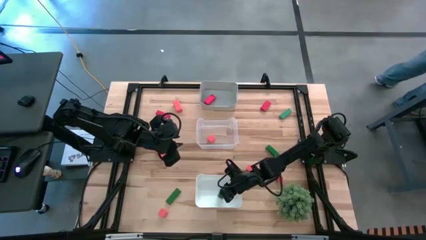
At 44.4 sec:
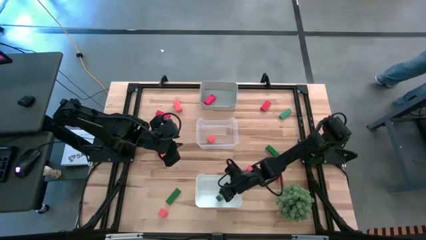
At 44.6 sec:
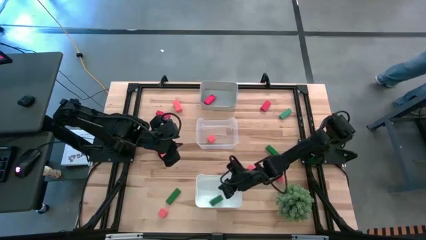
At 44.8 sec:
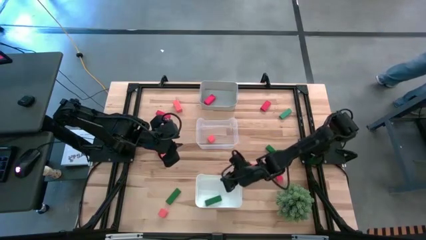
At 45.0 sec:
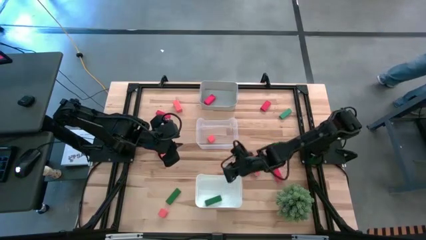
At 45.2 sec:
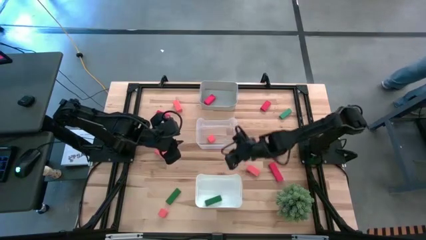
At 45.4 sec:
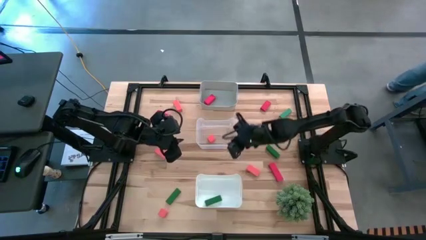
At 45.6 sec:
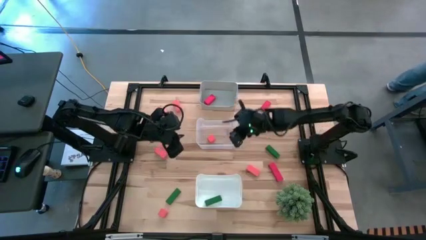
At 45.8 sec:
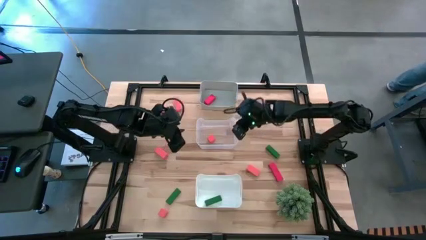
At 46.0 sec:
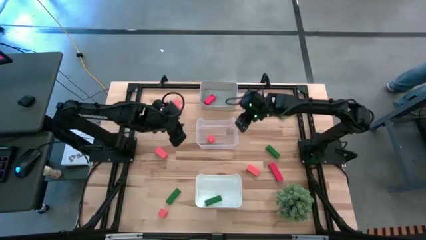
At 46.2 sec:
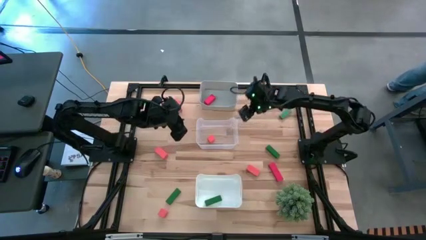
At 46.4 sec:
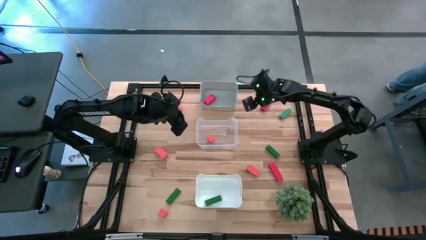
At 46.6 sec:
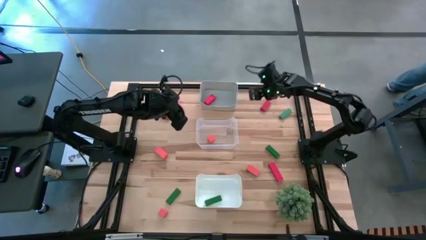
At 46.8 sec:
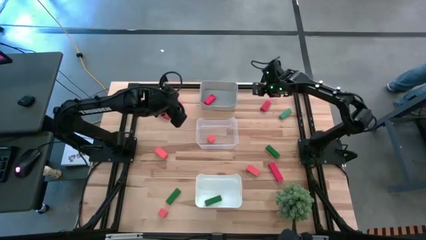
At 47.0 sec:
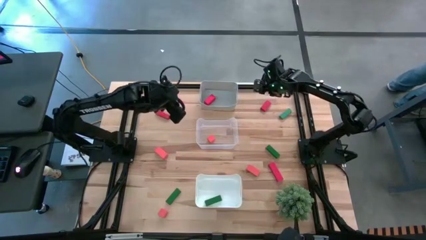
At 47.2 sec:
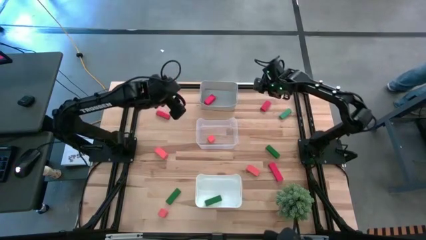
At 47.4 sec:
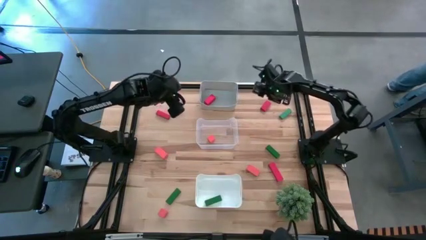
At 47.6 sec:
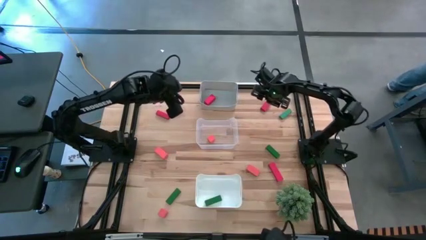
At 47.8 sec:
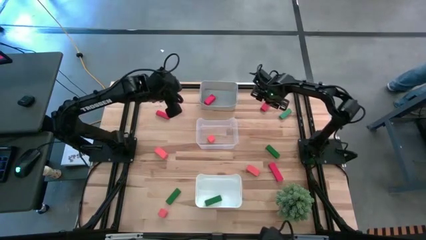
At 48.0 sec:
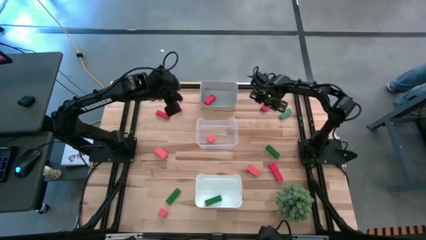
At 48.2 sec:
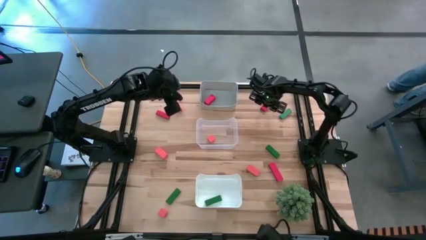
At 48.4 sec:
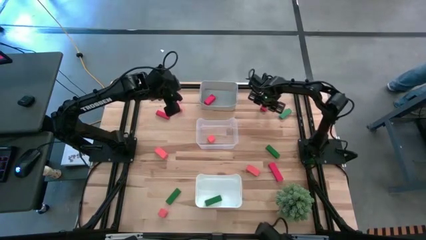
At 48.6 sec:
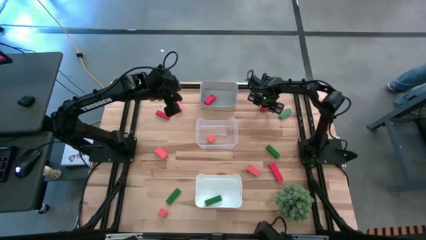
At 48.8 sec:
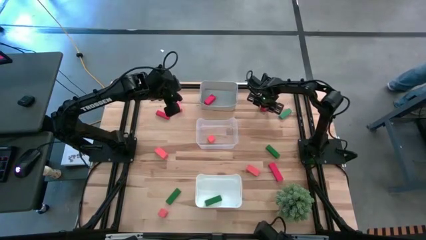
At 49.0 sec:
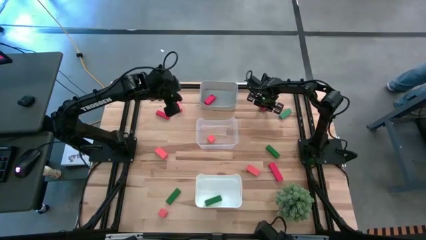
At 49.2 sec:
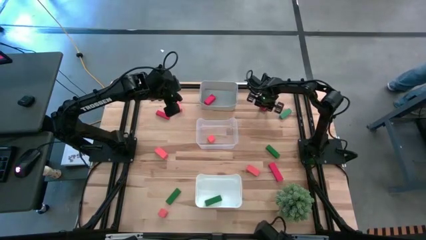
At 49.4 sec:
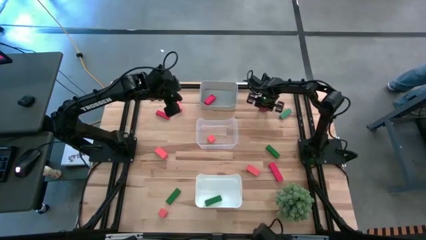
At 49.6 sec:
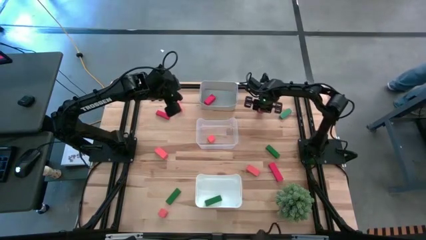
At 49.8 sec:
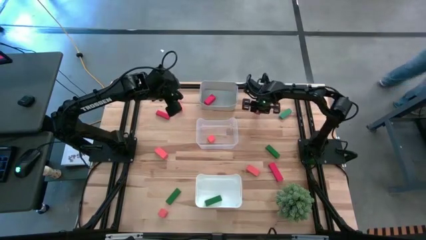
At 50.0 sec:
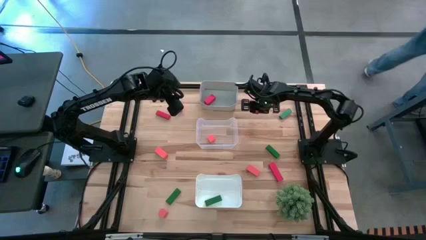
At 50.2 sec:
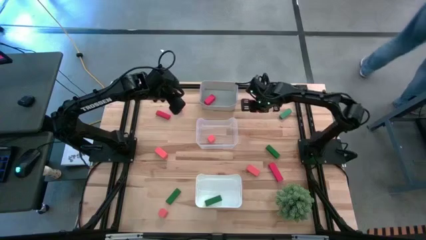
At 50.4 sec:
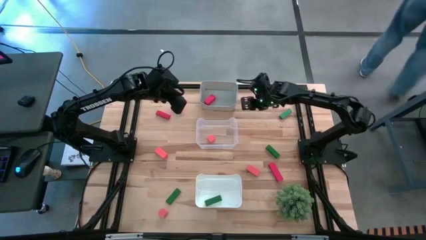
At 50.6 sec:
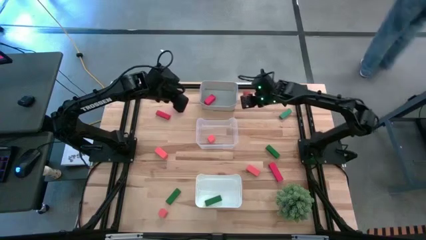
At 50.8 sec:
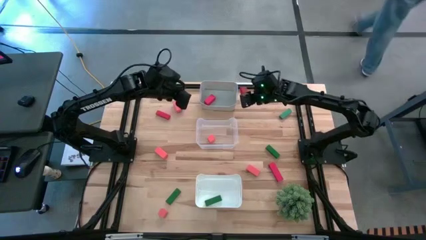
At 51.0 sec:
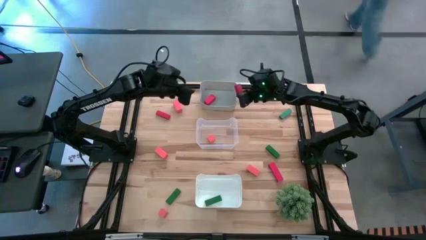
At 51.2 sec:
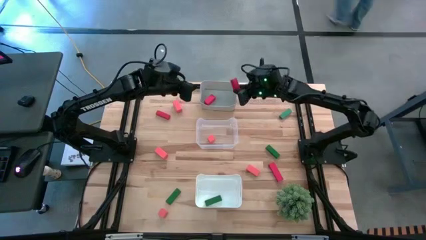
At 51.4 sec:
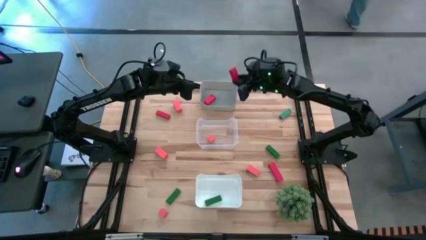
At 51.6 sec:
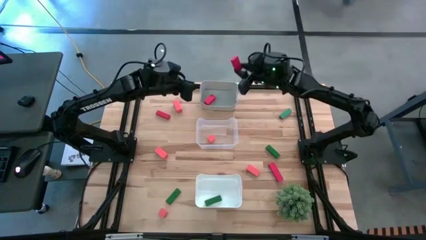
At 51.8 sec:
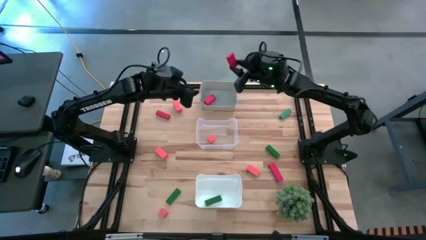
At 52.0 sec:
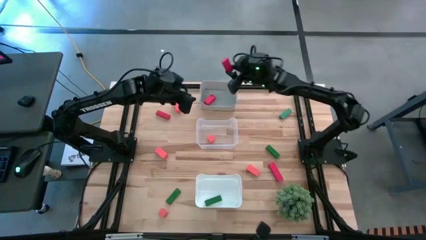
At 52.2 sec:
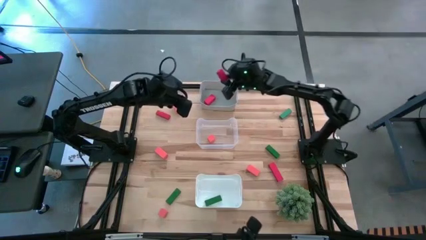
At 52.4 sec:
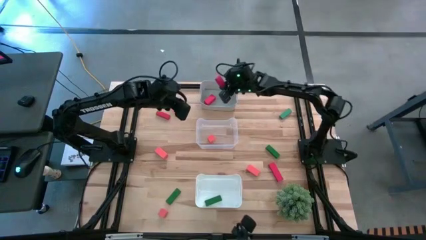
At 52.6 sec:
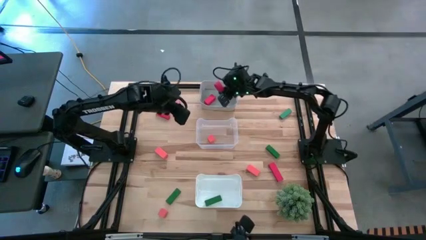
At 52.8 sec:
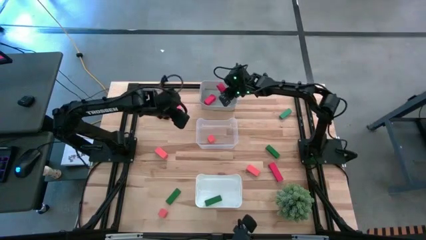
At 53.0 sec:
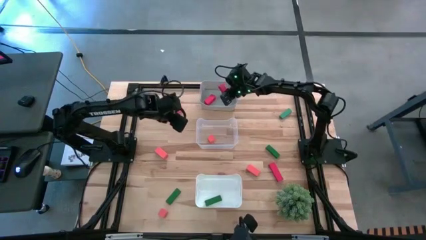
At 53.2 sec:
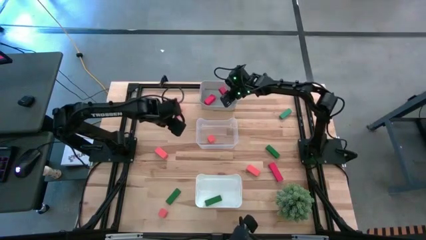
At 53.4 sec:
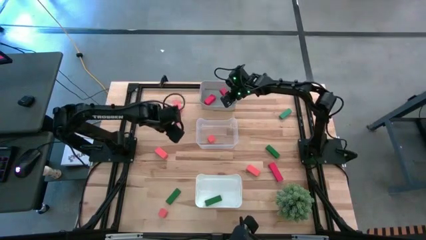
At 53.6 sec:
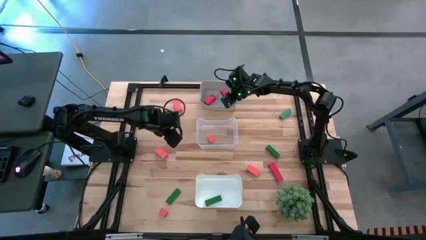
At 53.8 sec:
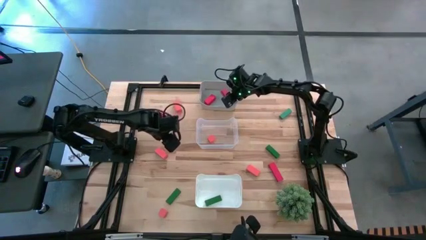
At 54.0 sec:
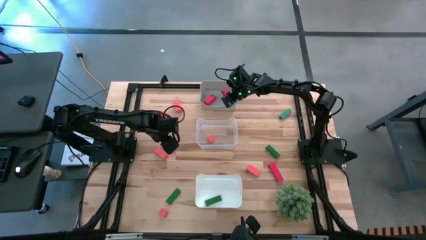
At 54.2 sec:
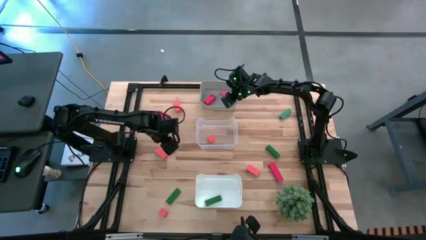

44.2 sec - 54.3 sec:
Task: Sort & place blocks by color
Put the top right red block into the gray bin

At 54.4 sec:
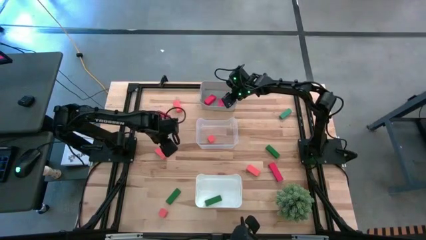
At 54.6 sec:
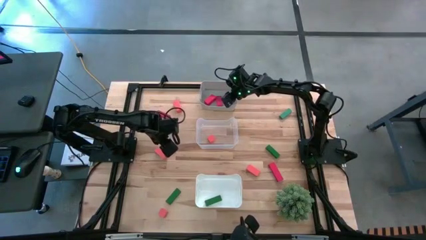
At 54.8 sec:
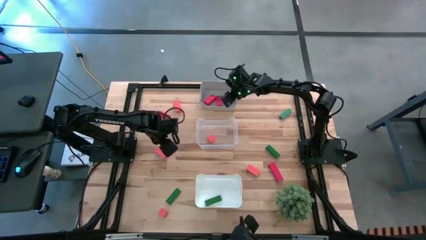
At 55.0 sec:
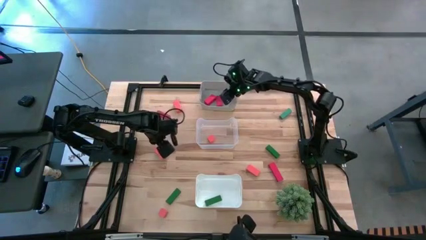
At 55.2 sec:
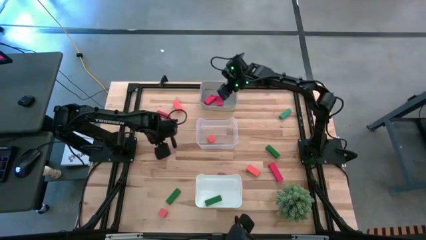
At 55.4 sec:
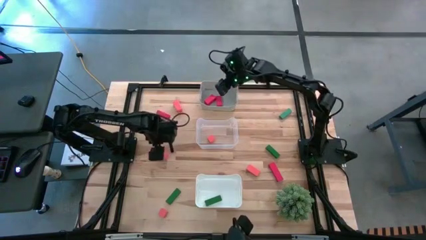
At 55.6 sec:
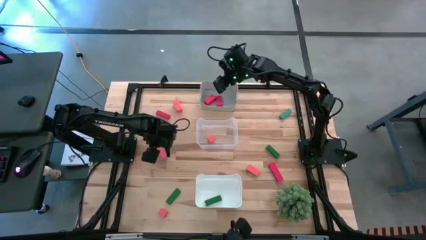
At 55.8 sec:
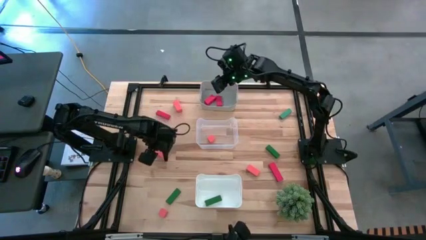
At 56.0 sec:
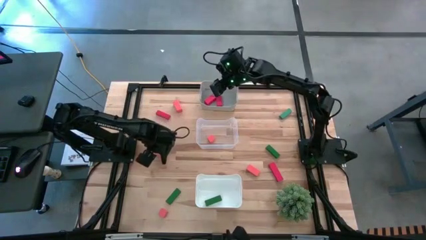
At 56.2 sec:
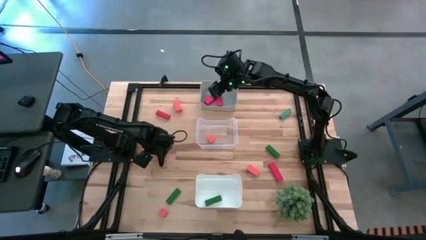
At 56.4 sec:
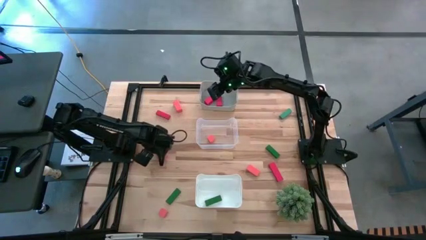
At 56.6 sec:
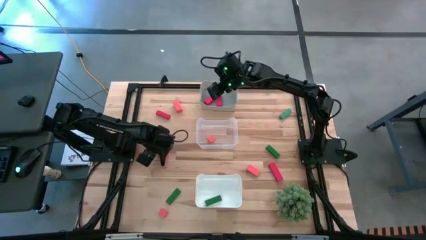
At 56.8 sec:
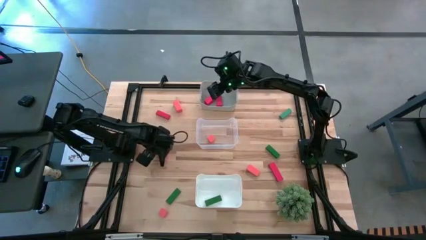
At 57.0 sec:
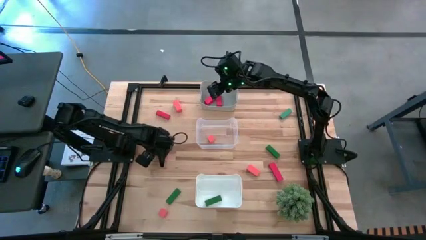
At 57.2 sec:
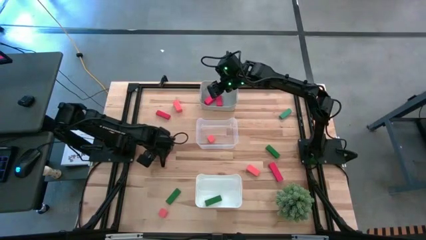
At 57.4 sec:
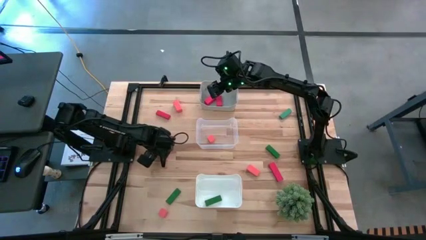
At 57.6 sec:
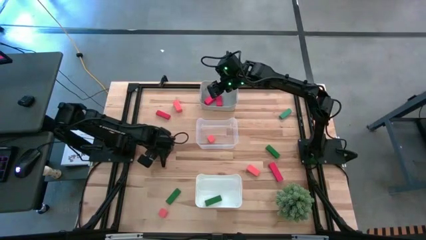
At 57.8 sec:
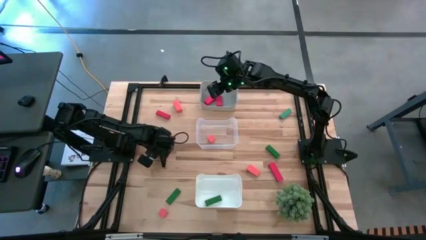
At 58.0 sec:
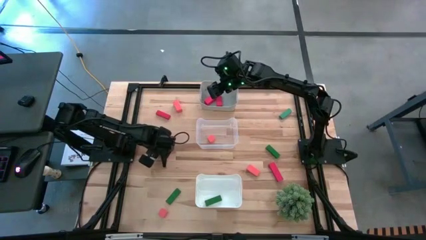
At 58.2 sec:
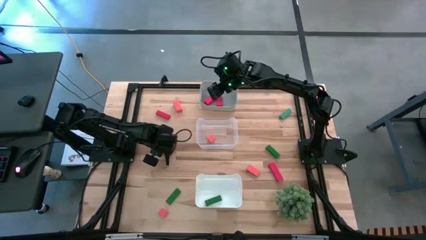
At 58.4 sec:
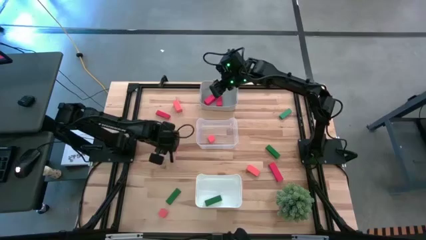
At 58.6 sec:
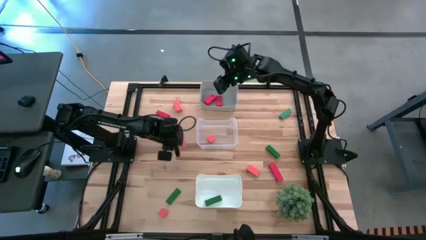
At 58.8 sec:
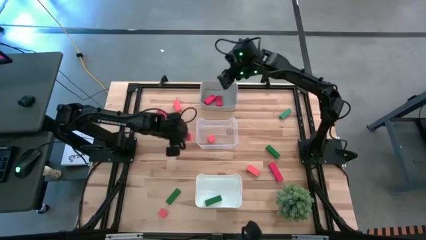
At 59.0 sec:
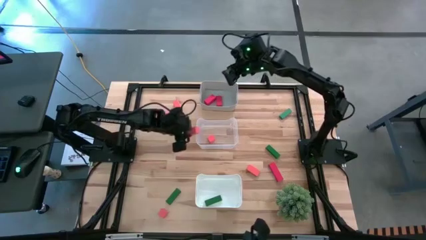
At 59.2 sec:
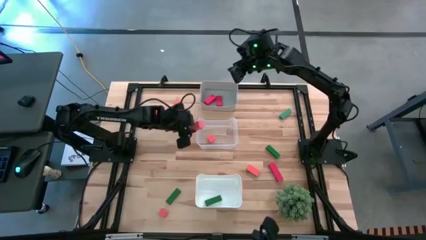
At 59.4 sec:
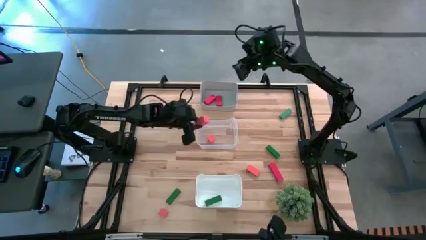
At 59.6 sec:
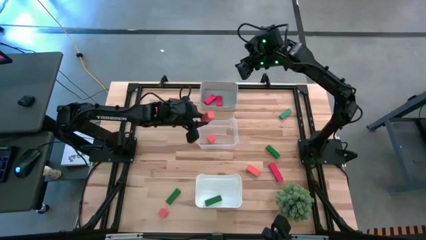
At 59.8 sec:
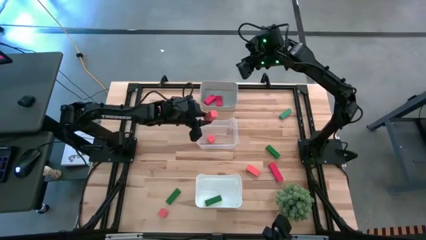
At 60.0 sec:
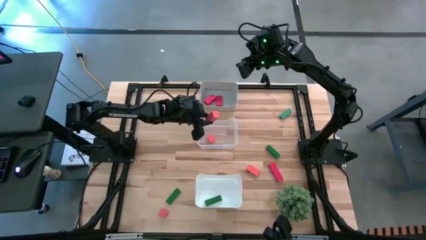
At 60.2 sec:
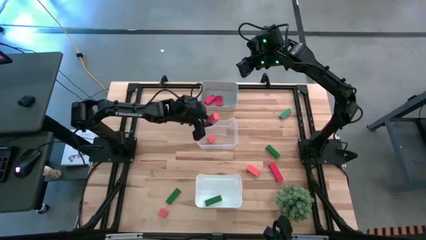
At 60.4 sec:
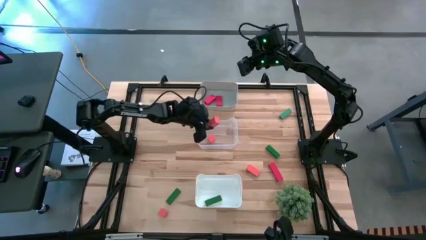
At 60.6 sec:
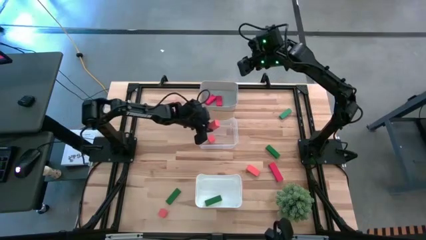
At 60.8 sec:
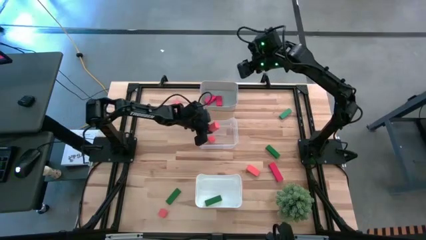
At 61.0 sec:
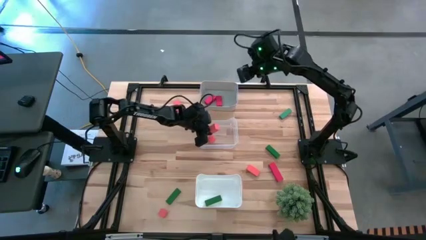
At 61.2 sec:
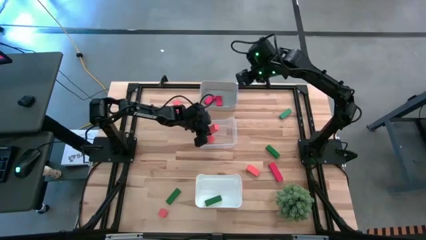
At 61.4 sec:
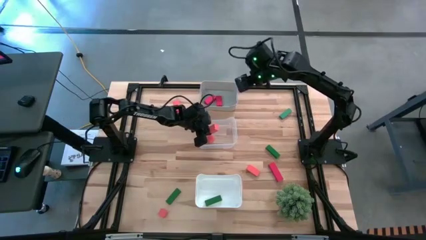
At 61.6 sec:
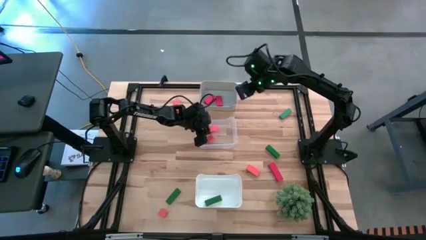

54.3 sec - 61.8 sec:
Put the orange block into the transparent bin
